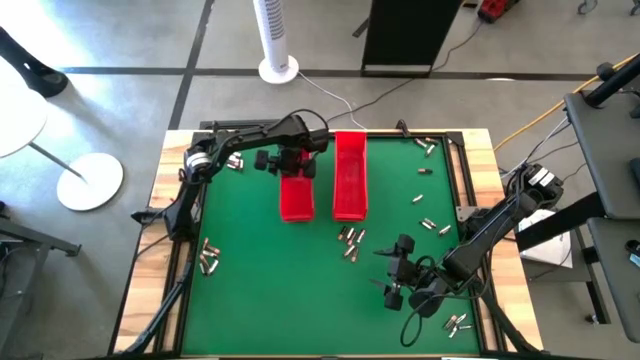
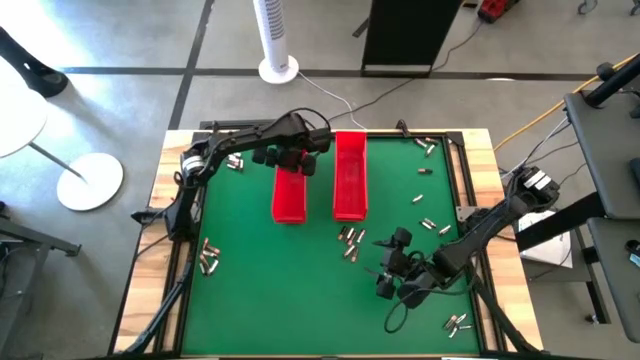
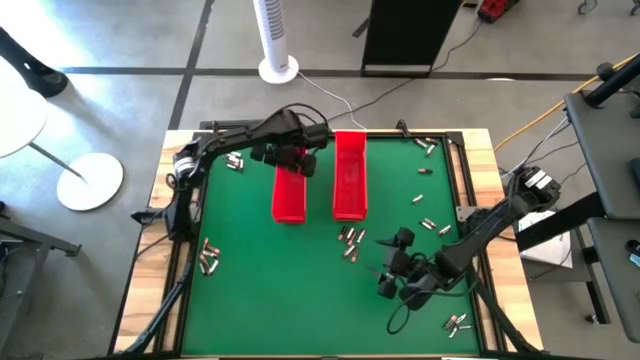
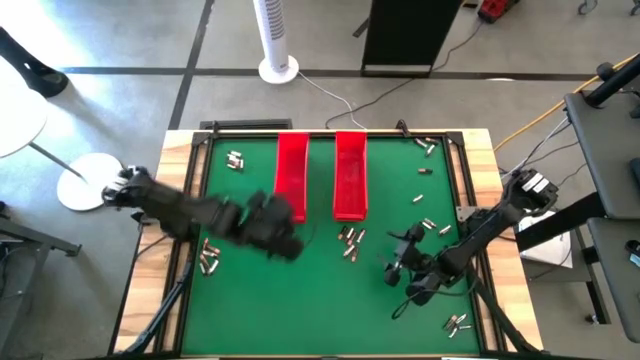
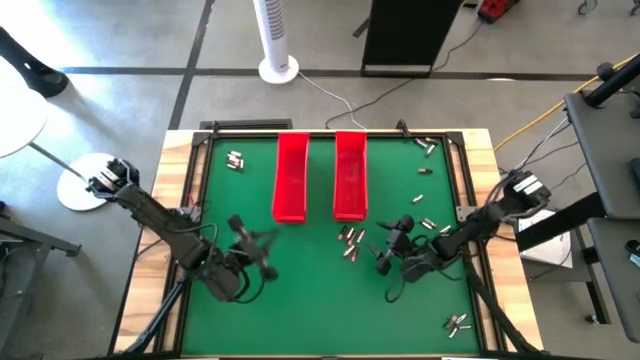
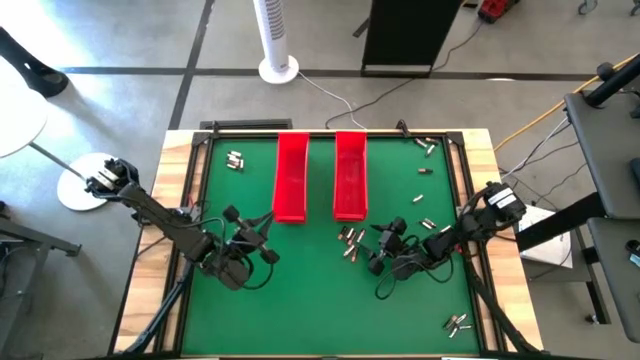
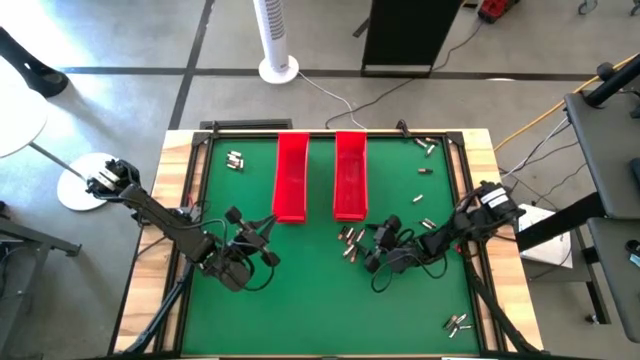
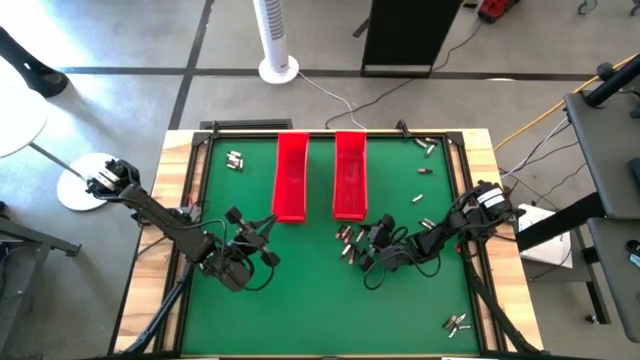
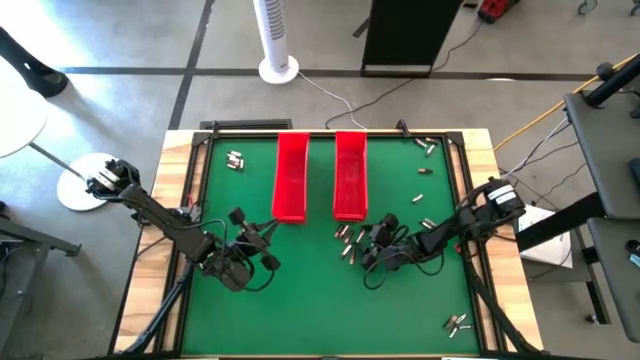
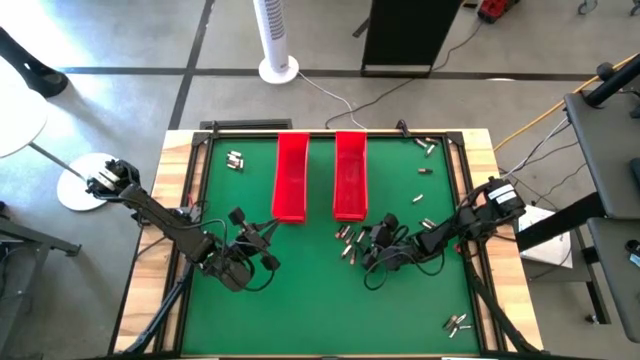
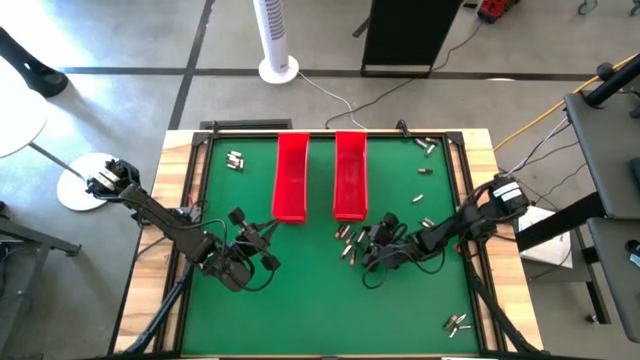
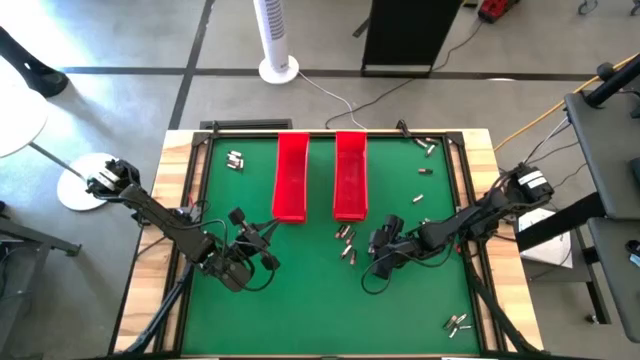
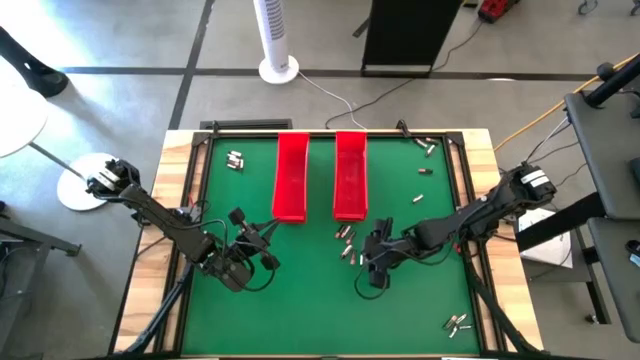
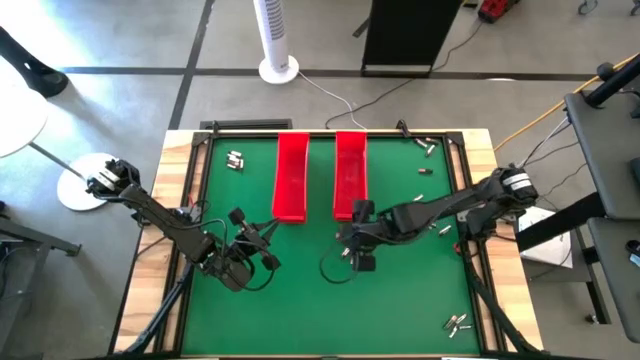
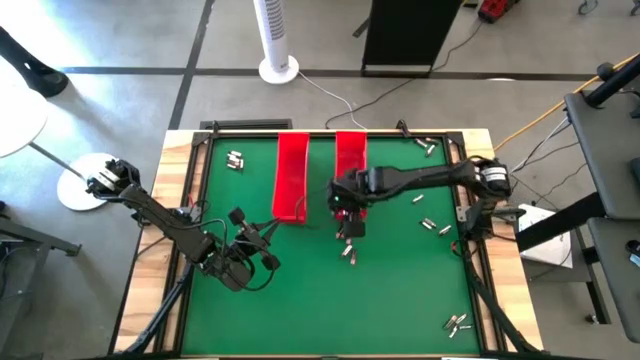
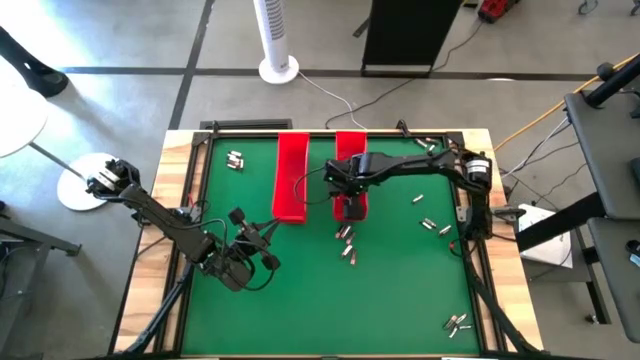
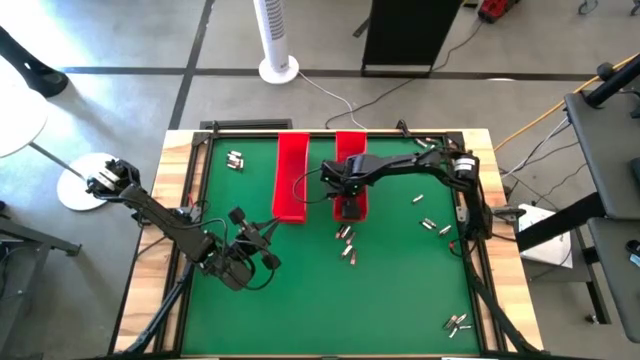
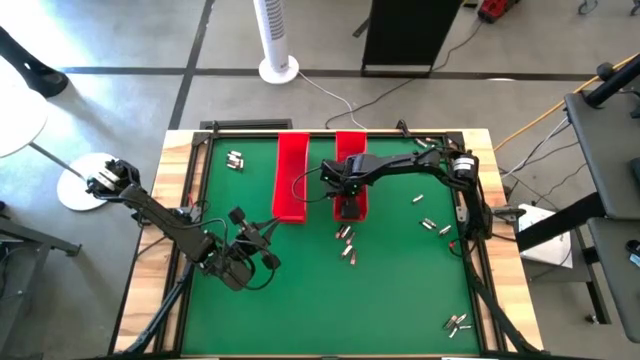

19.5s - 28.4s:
Task: Sort batteries
Put the silver battery into the right red bin

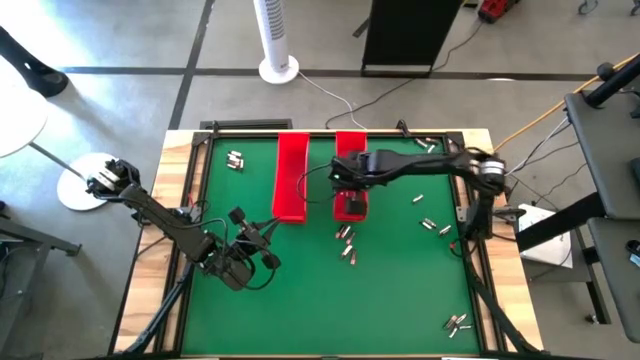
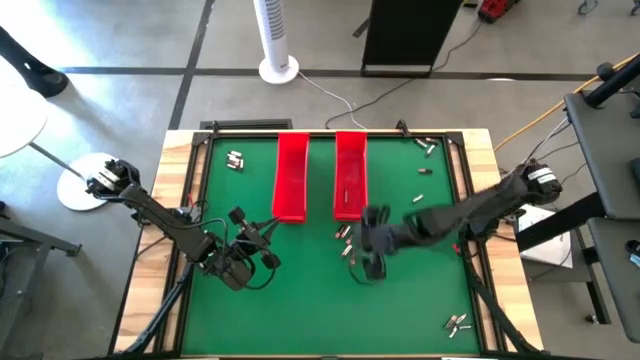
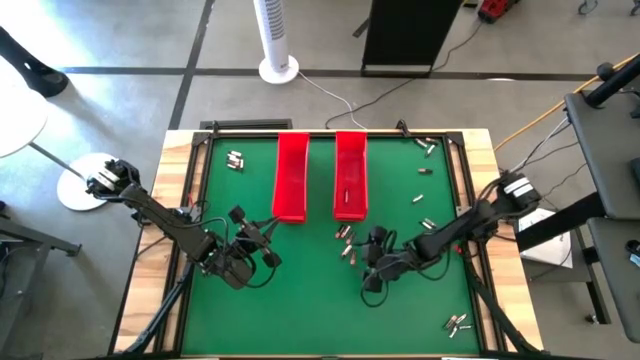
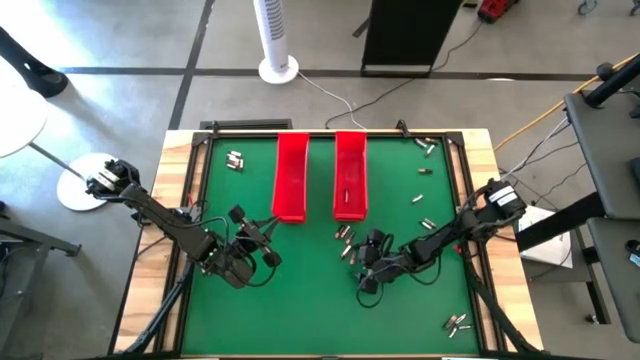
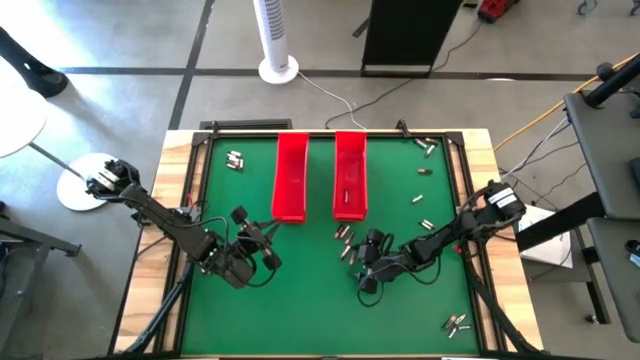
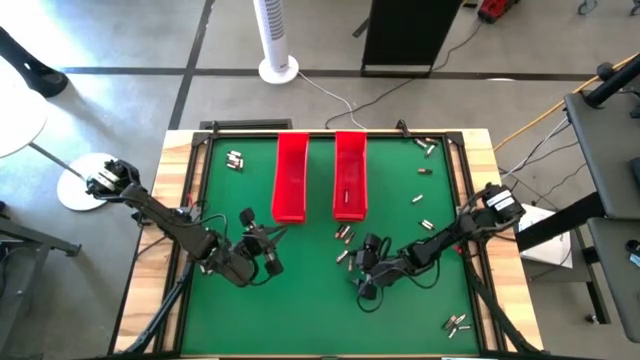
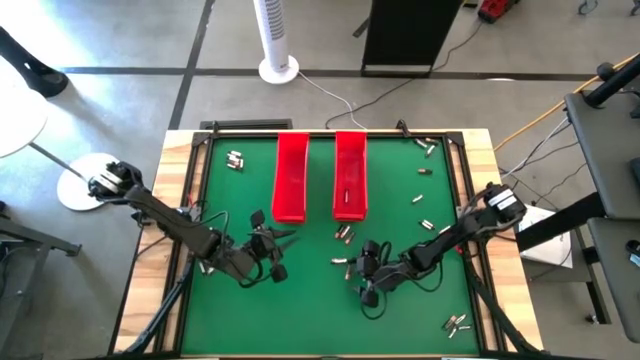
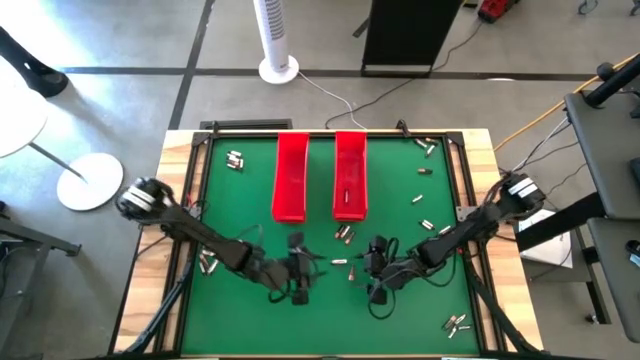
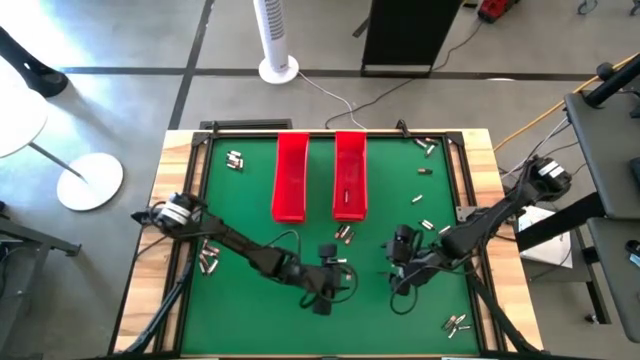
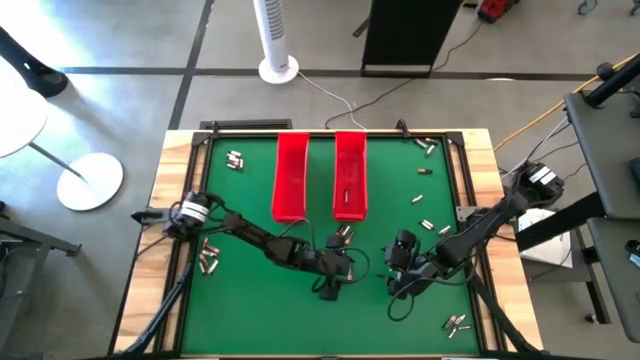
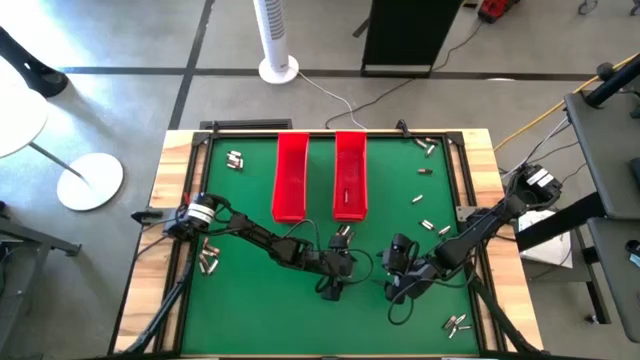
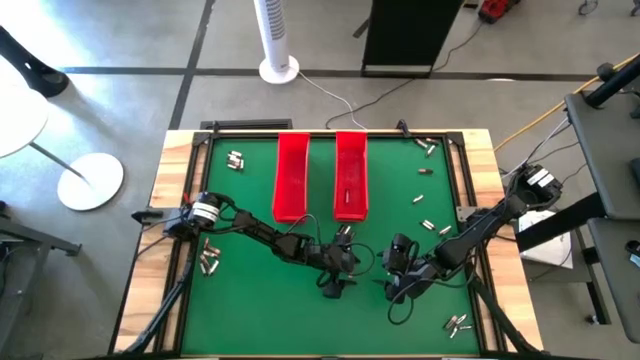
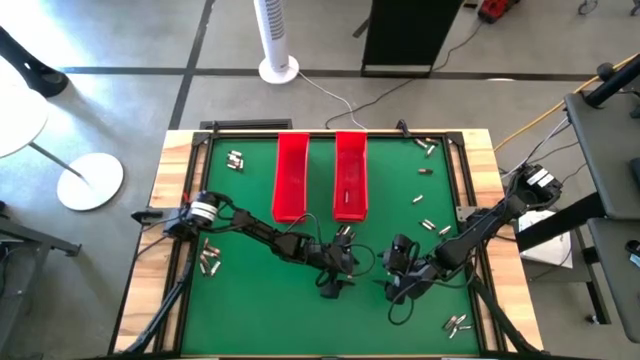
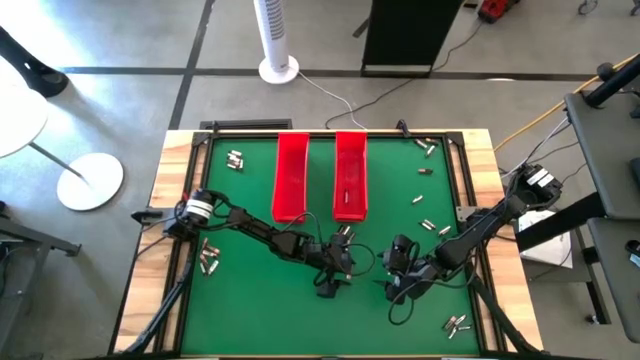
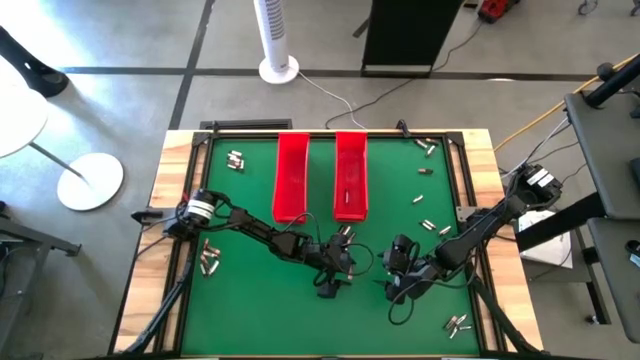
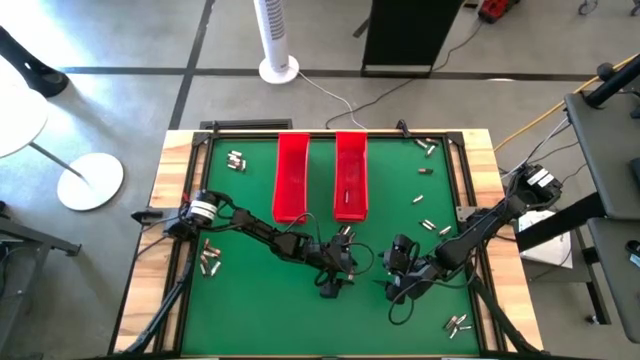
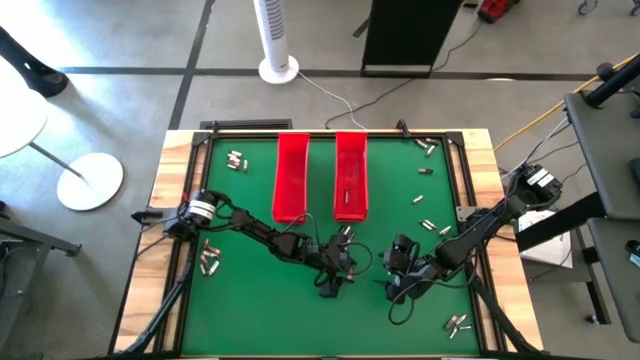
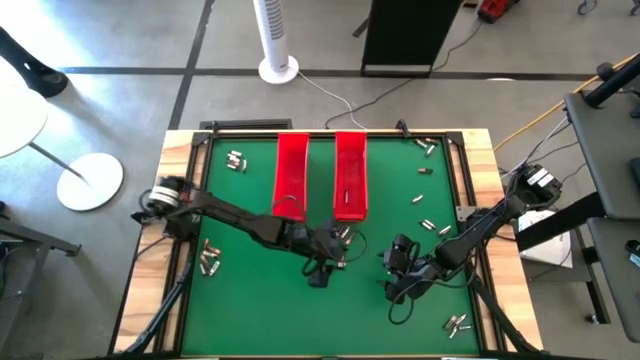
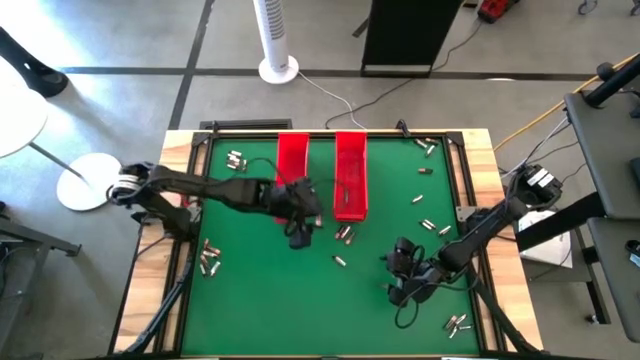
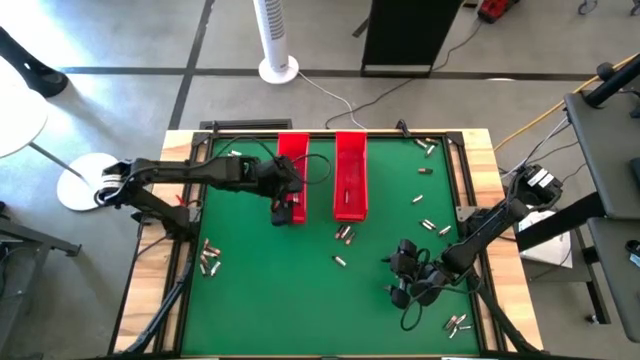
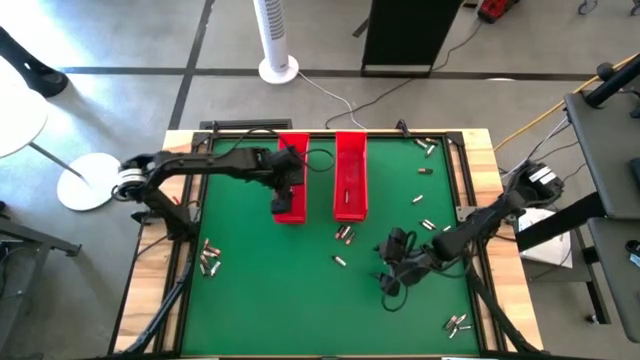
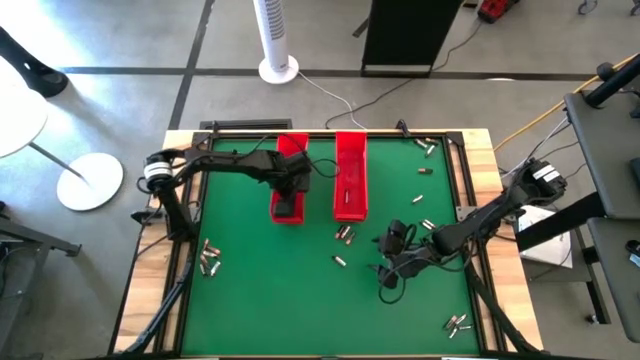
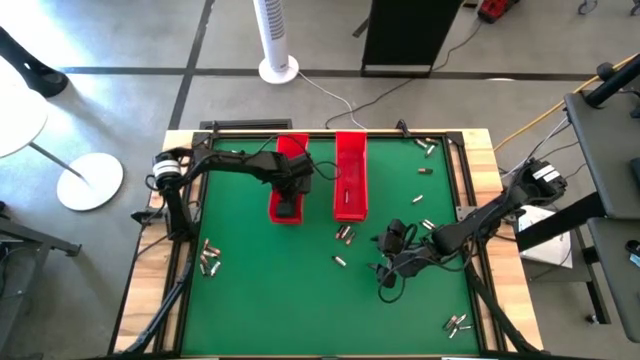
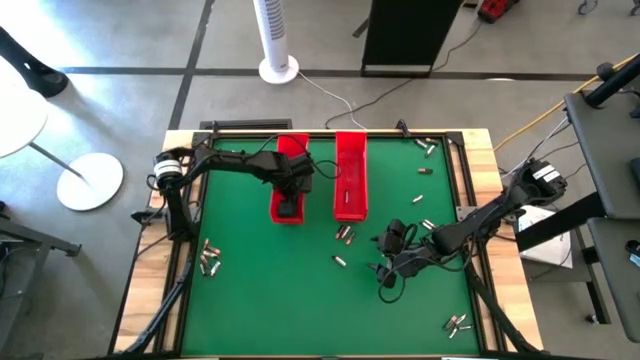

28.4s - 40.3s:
Put the black battery into the left red bin
